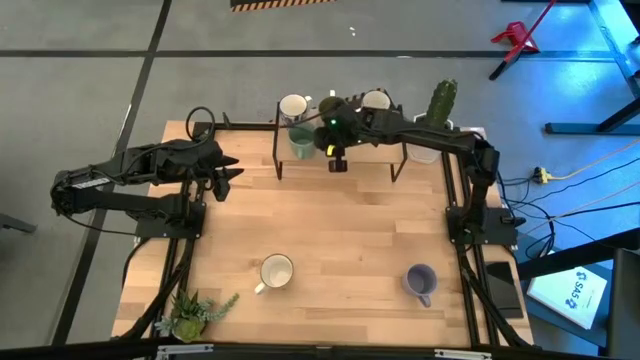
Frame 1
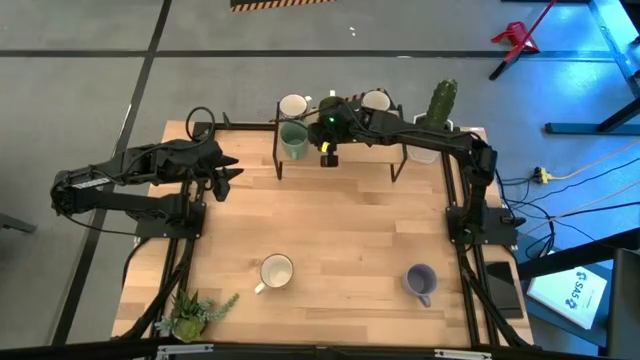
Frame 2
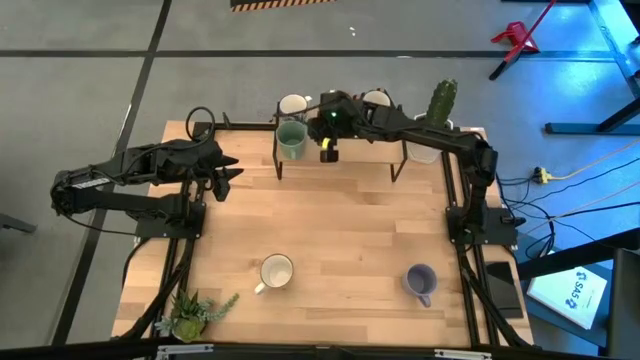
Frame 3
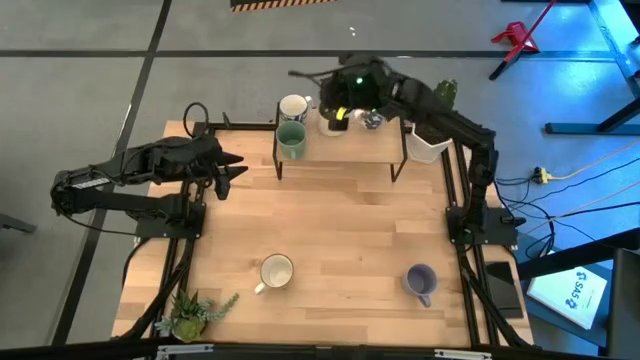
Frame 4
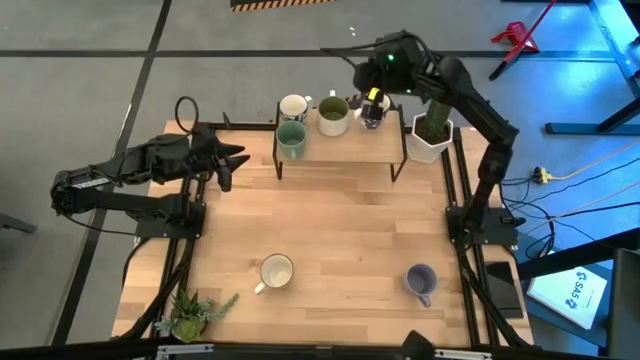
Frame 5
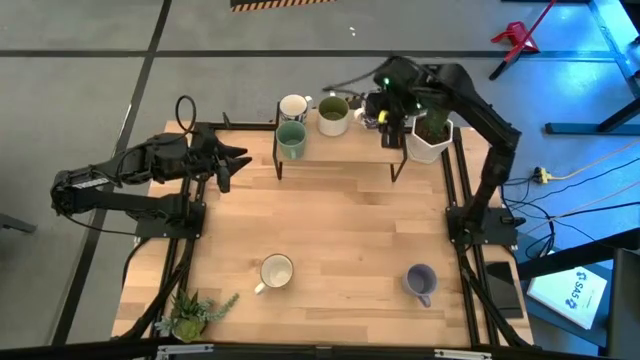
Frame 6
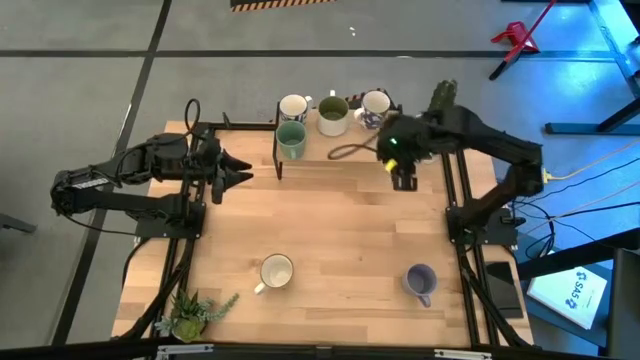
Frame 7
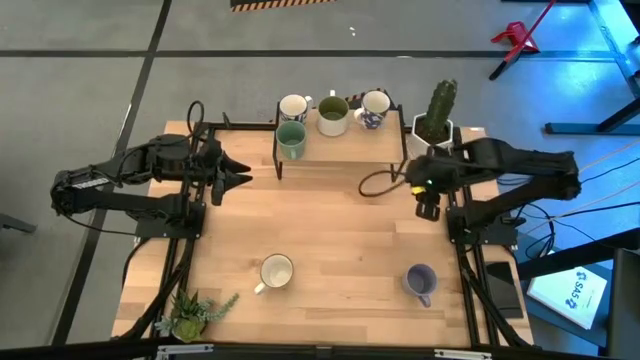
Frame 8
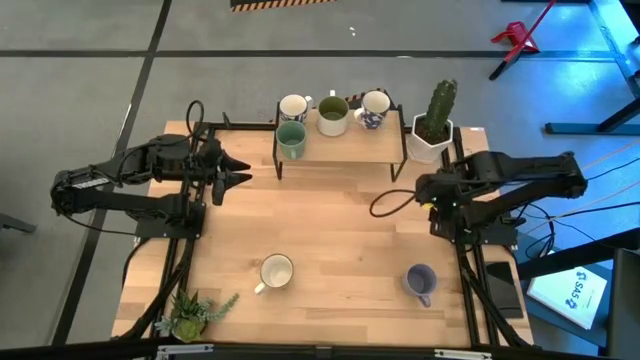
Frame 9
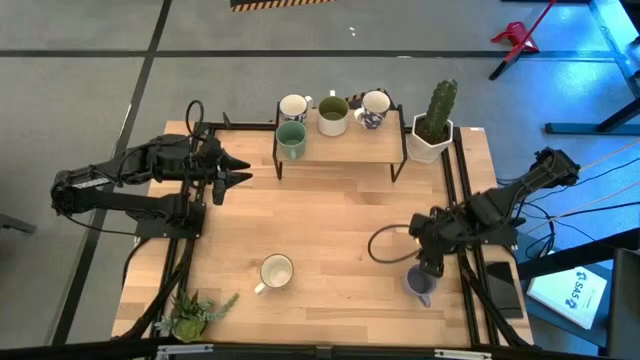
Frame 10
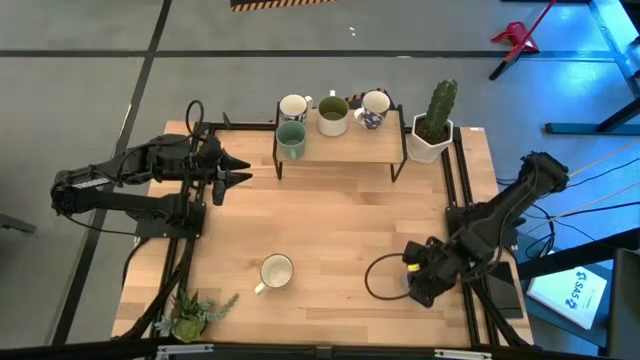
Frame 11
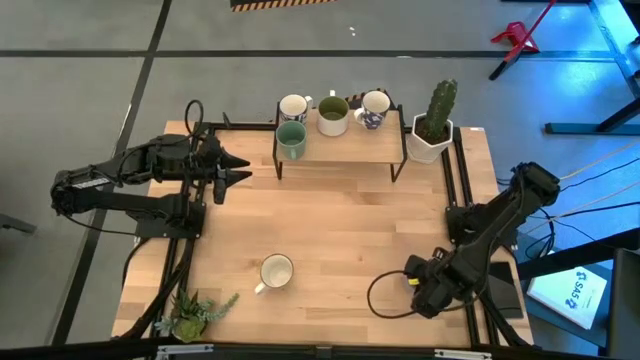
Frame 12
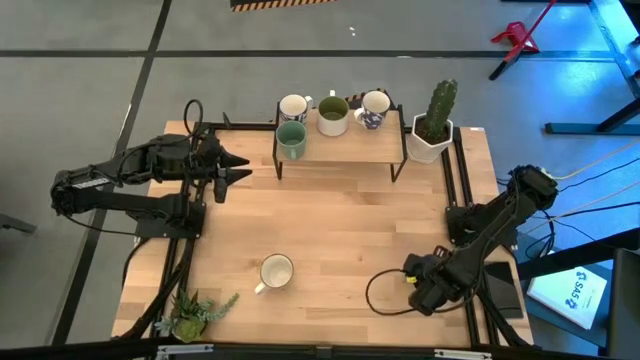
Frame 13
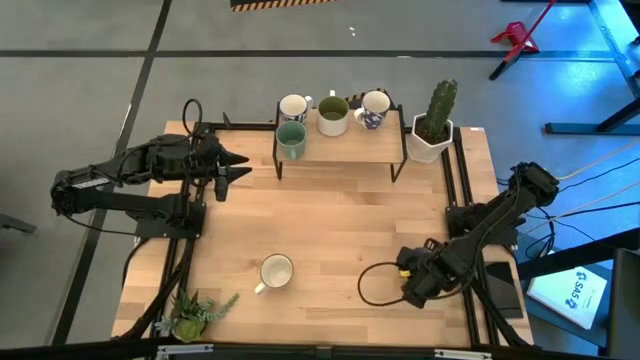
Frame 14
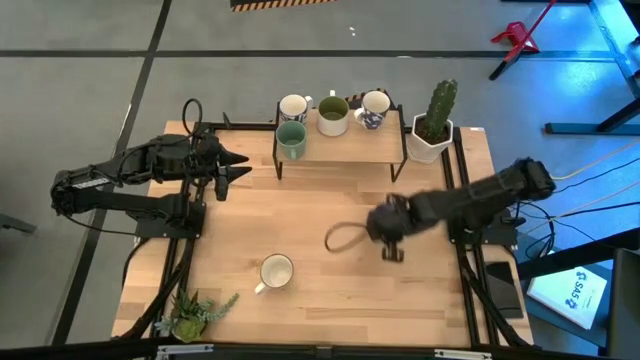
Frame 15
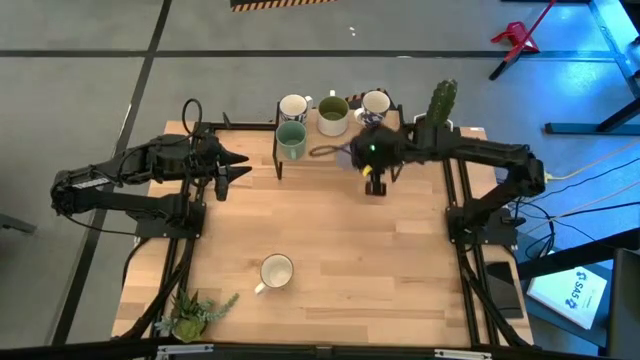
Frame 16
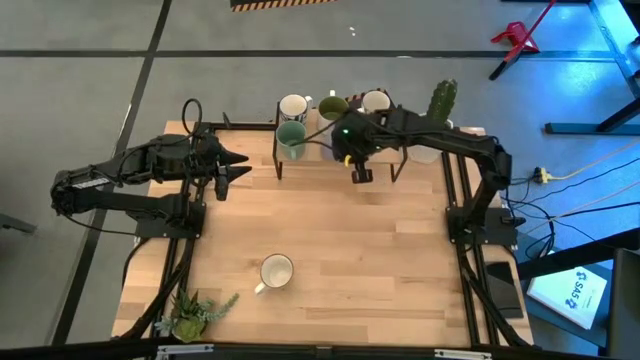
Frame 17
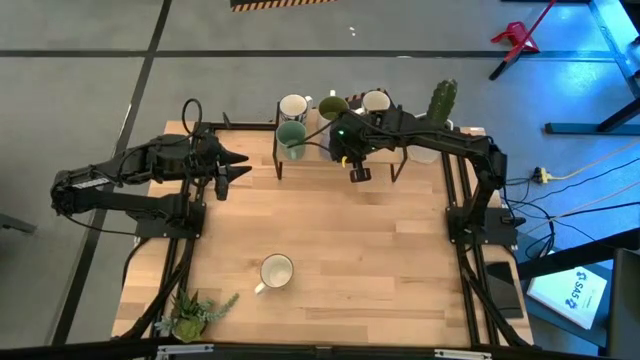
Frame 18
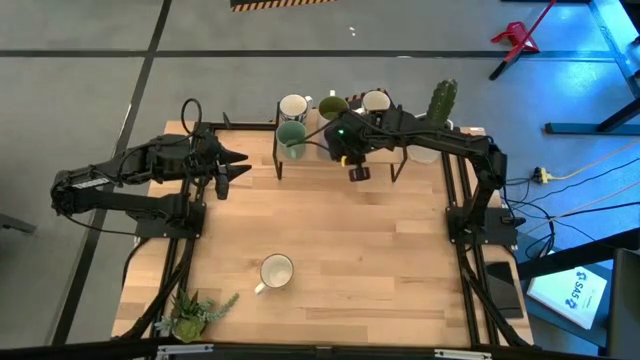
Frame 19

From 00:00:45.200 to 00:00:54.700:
Task: Place coffee mugs
Put the blue mug on the shelf

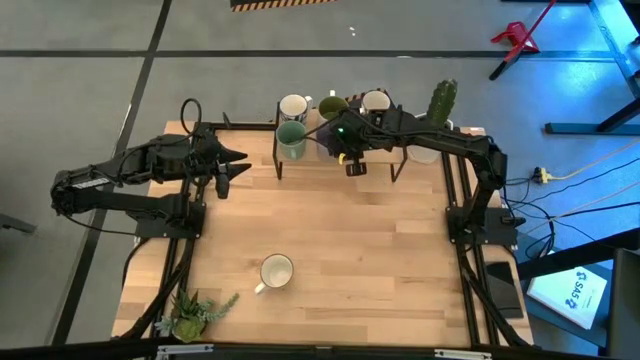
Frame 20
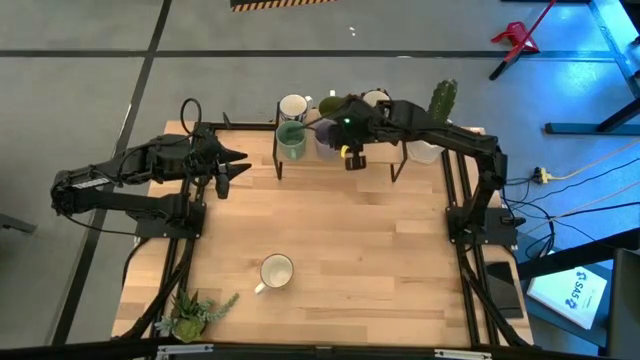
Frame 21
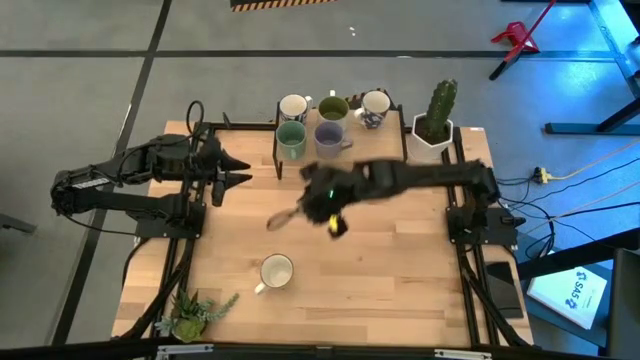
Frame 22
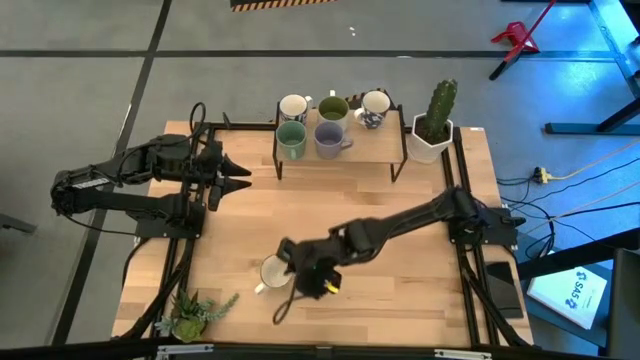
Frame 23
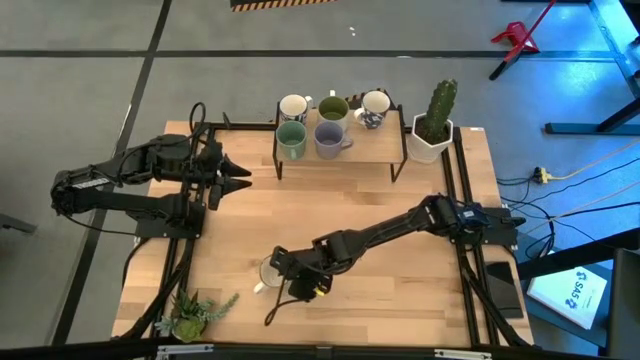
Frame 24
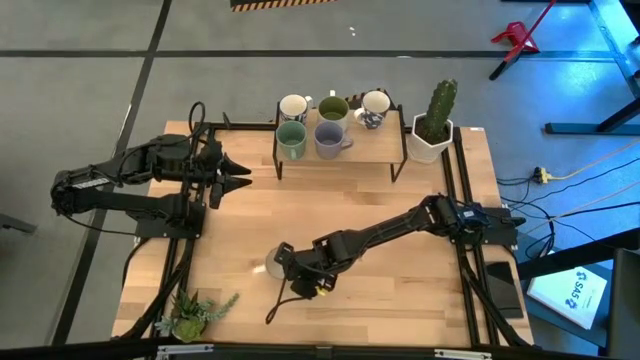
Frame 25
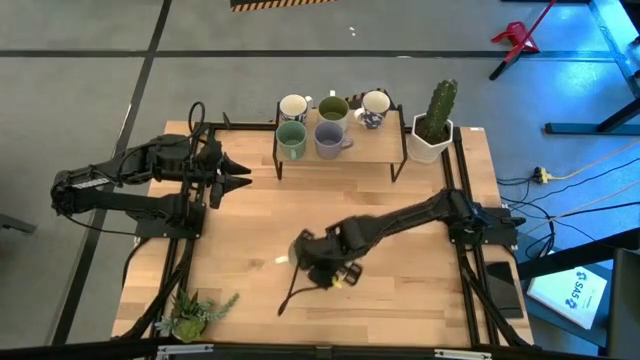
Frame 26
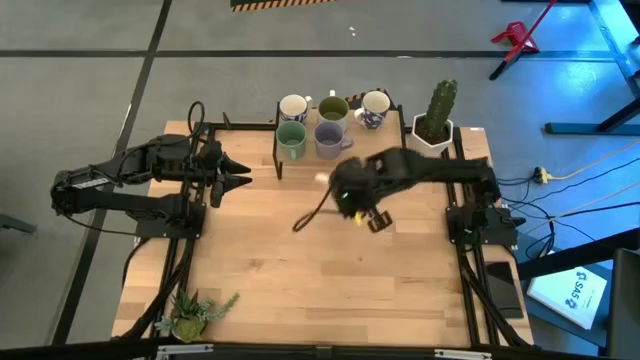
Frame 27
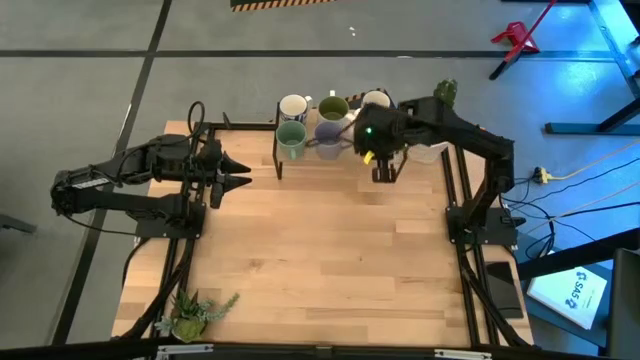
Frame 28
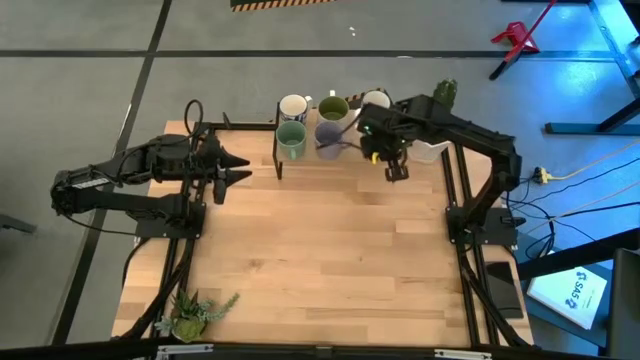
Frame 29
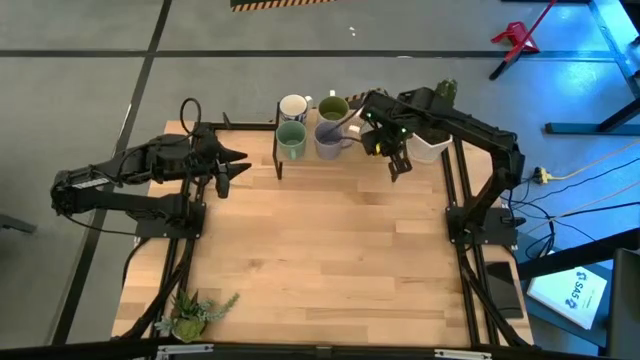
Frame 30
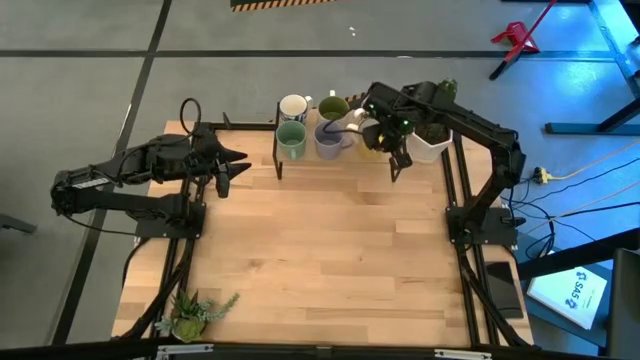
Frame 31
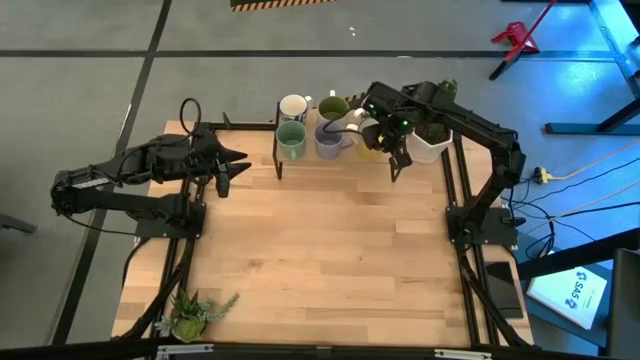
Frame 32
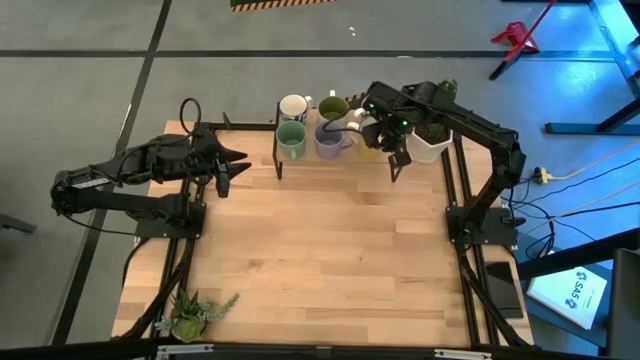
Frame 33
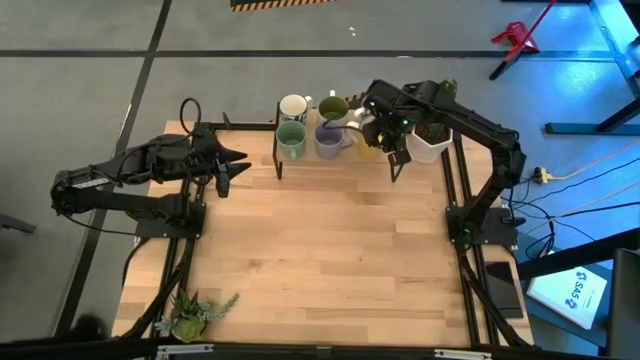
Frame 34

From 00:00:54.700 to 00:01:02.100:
Put the yellow mug on the shelf

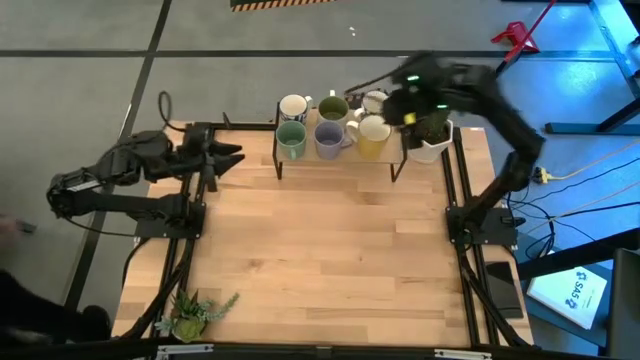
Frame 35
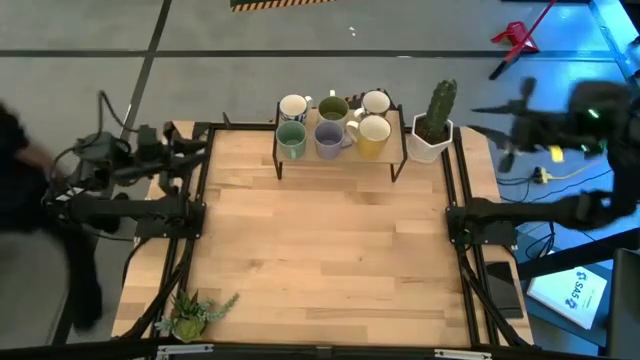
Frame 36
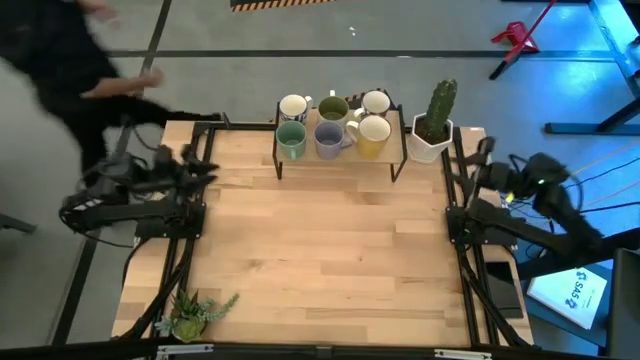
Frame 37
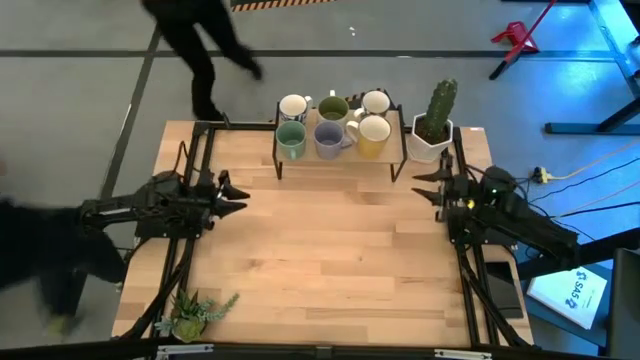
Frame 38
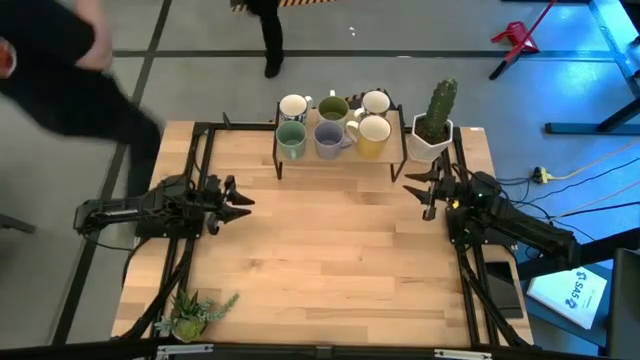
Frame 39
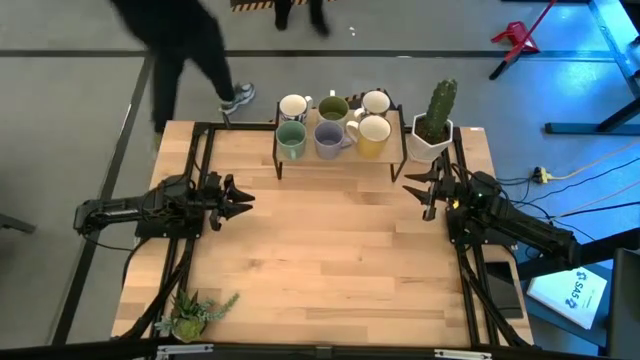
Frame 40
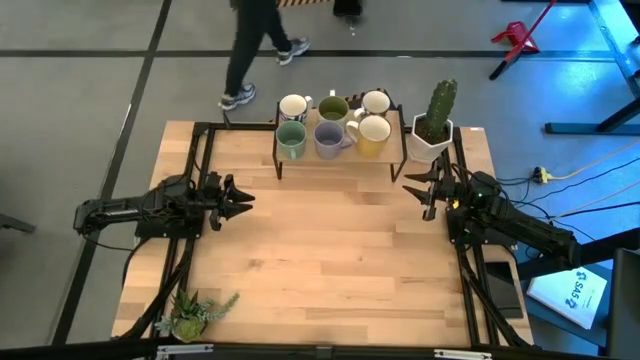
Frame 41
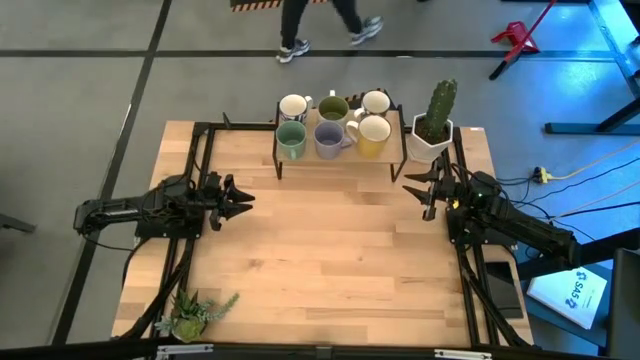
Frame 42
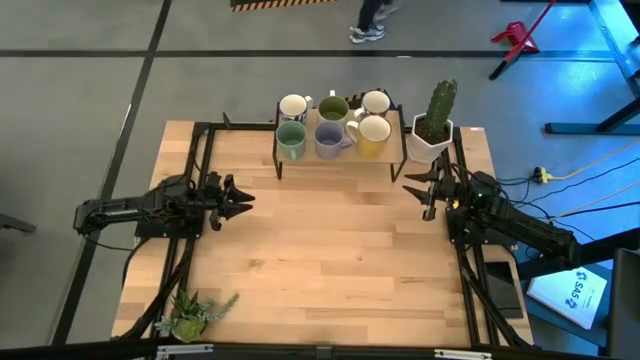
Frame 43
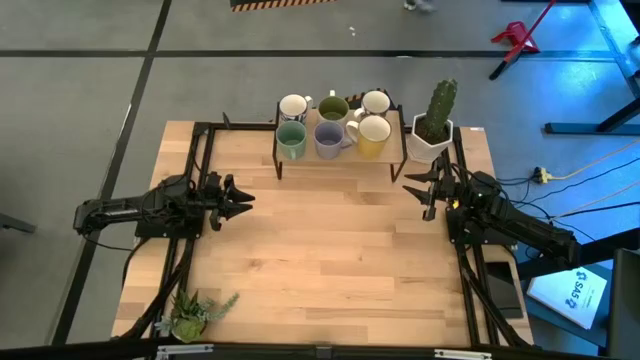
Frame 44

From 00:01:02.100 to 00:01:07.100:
Return to Home Position
